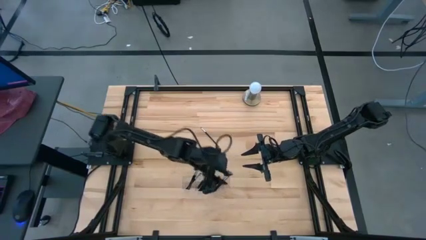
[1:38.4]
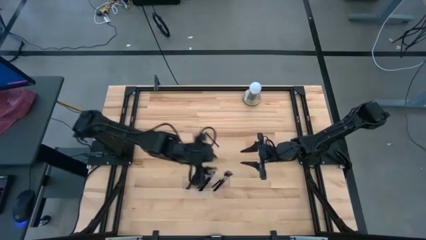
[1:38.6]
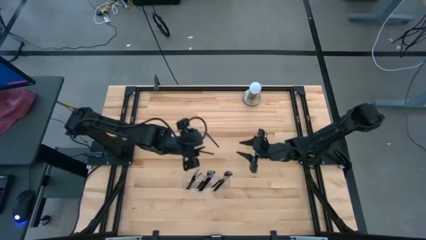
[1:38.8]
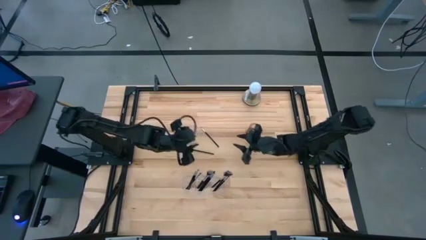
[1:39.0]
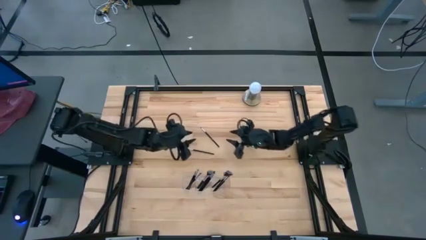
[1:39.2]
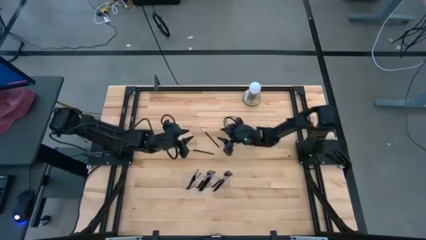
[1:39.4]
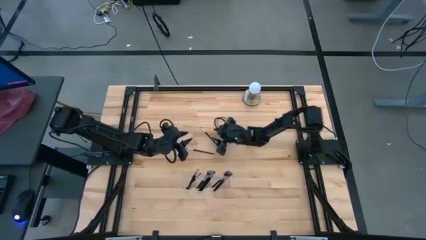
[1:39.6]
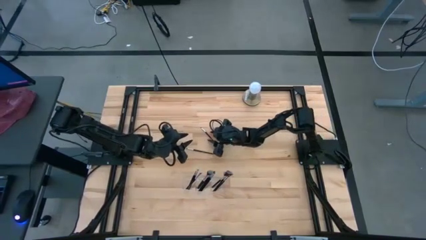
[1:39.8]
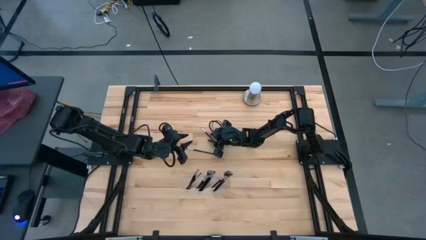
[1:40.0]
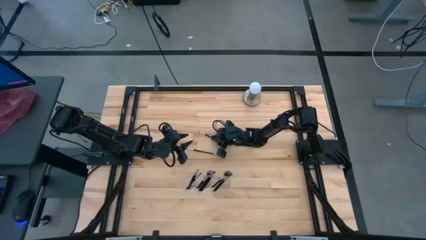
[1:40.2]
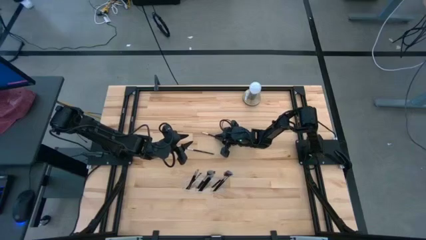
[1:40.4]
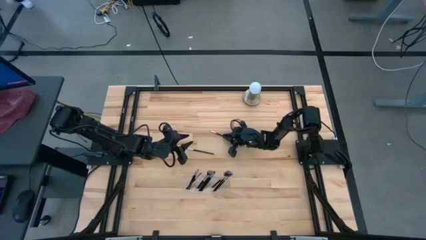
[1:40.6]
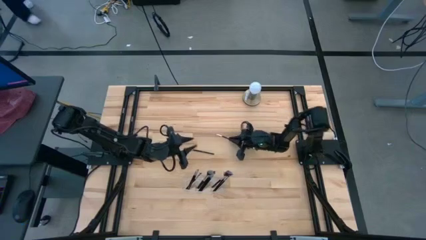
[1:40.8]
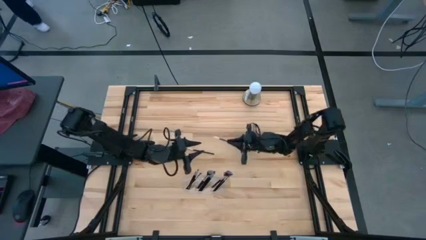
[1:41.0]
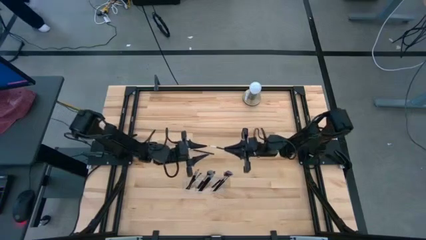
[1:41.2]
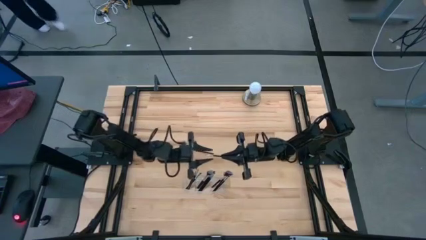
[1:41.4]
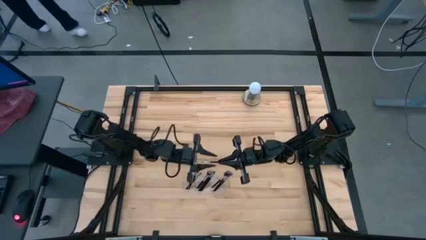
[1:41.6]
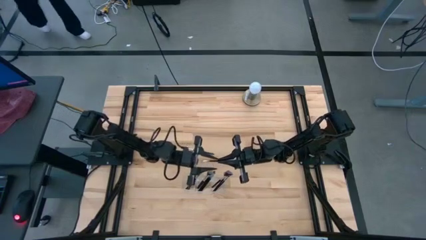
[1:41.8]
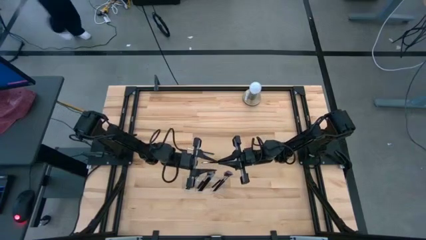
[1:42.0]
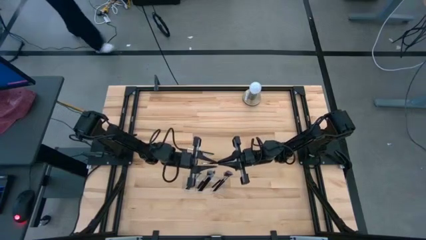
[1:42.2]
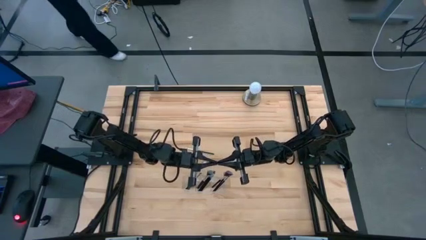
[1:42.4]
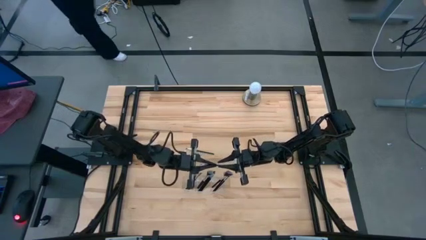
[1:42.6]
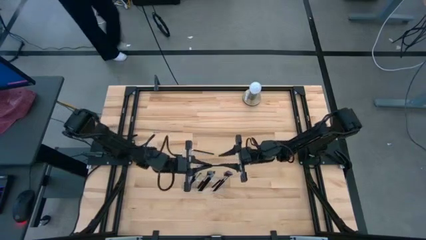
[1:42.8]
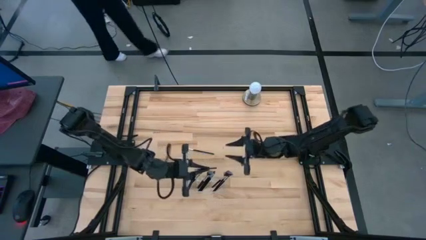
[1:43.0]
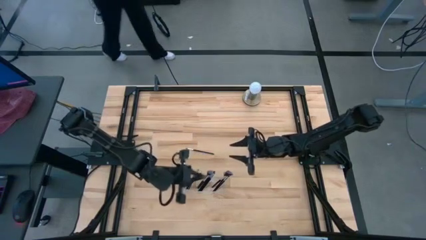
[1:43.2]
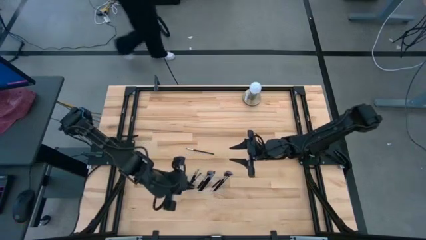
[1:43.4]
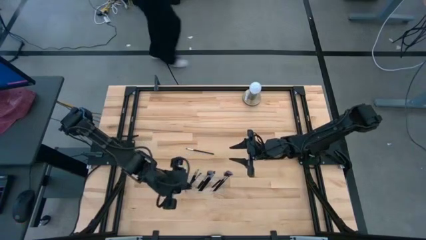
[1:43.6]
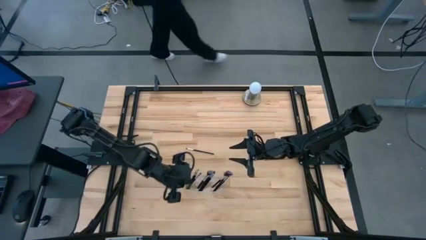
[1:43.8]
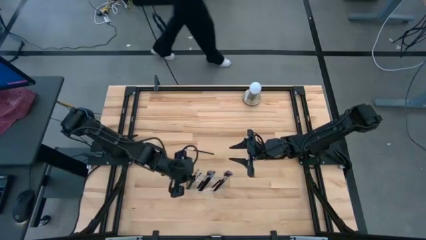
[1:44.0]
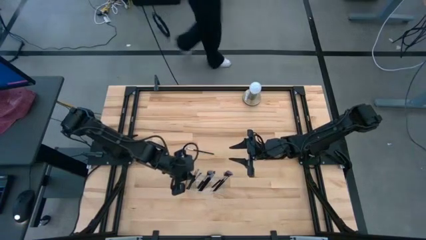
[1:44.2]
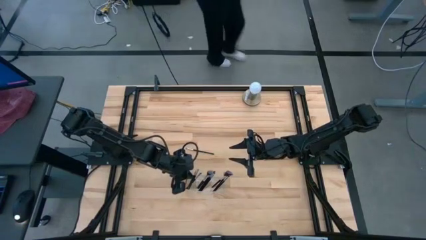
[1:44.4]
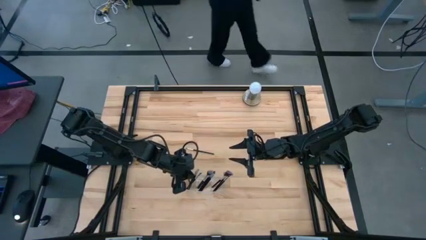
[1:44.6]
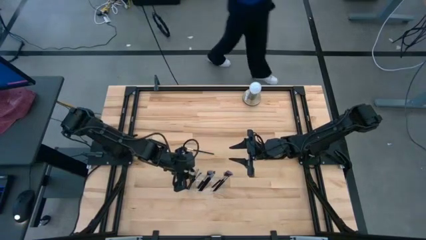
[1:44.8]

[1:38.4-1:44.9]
Task: Put items in baskets/containers
Put the black eyeshadow brush into the transparent organizer

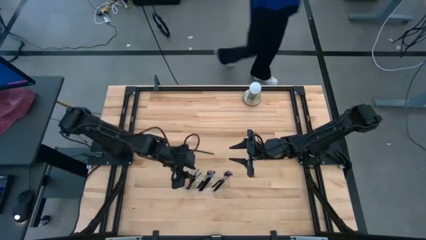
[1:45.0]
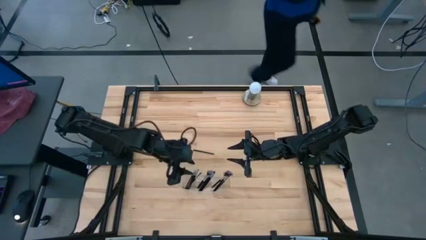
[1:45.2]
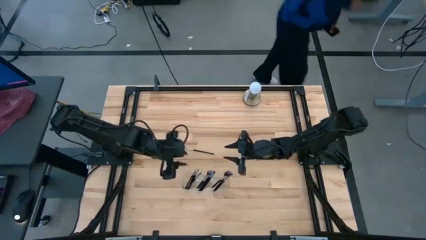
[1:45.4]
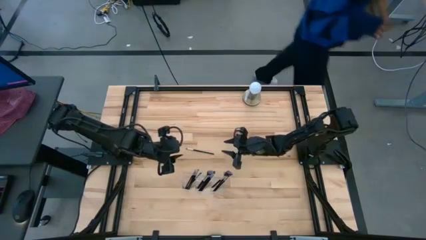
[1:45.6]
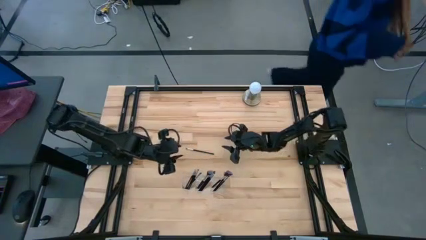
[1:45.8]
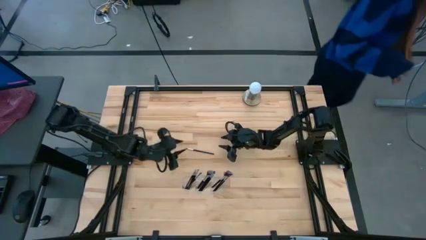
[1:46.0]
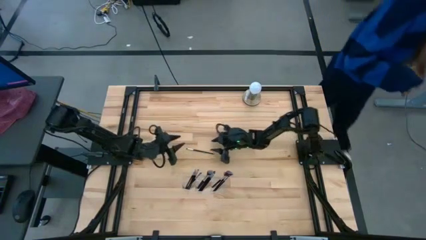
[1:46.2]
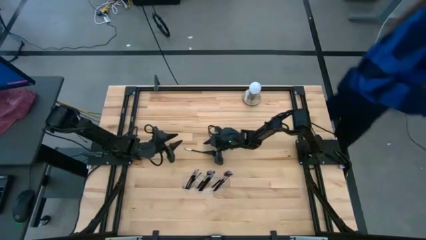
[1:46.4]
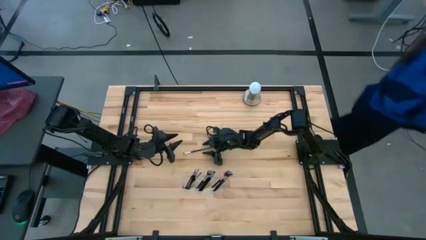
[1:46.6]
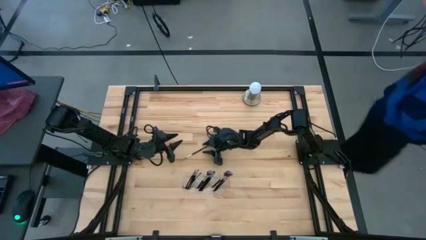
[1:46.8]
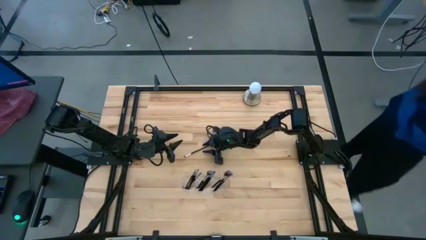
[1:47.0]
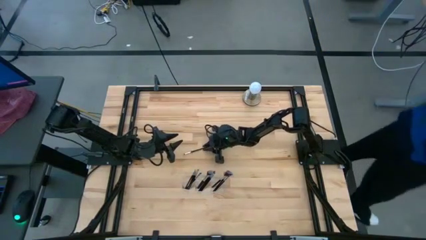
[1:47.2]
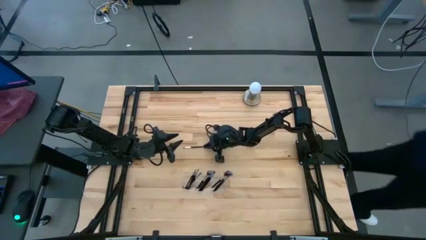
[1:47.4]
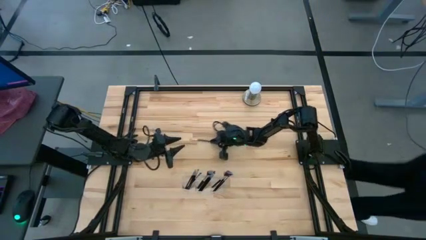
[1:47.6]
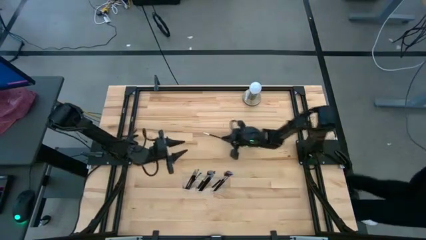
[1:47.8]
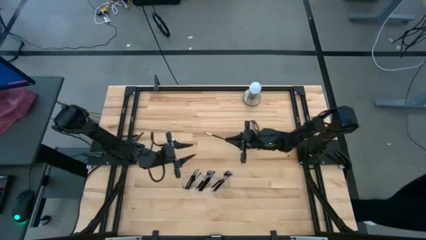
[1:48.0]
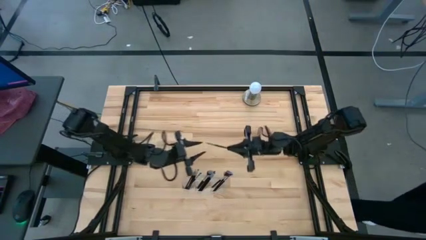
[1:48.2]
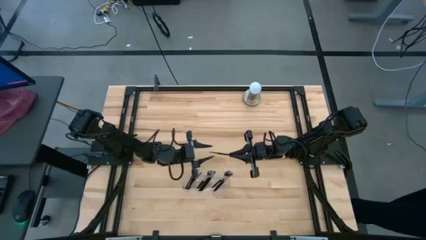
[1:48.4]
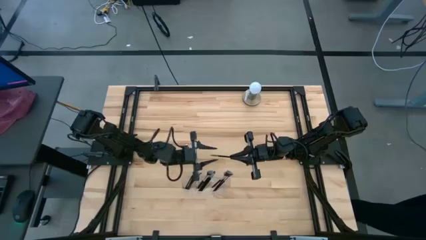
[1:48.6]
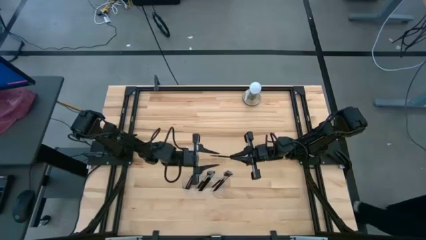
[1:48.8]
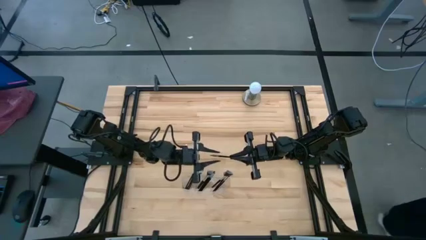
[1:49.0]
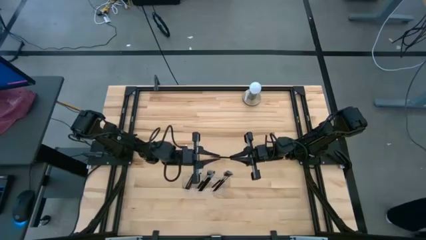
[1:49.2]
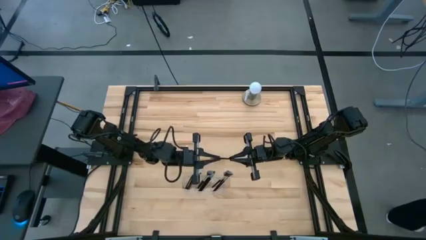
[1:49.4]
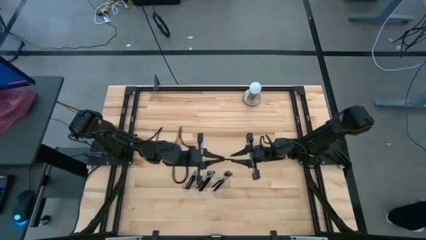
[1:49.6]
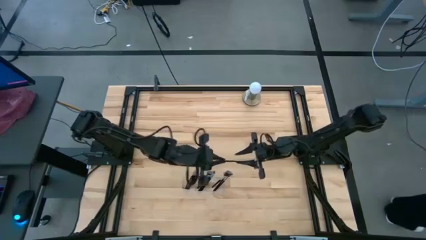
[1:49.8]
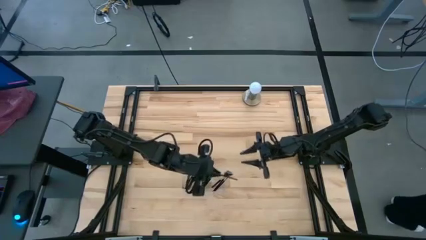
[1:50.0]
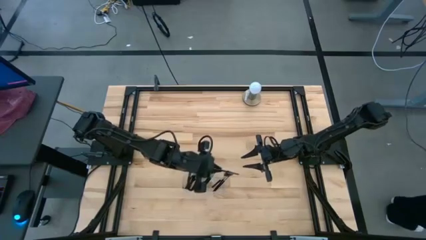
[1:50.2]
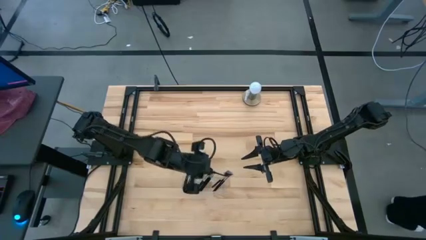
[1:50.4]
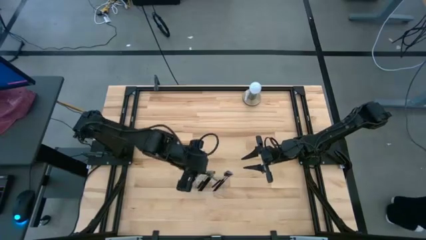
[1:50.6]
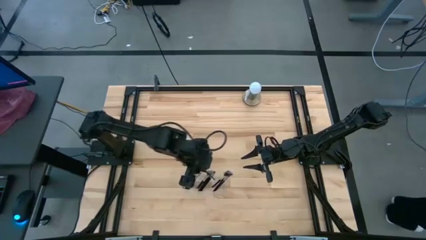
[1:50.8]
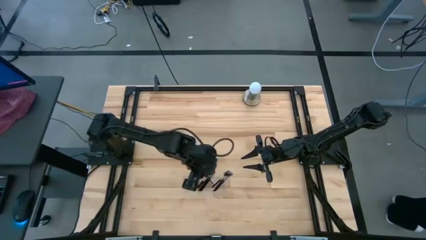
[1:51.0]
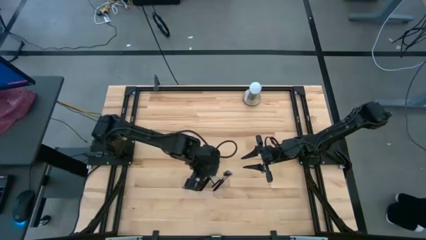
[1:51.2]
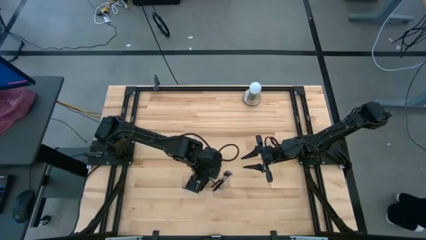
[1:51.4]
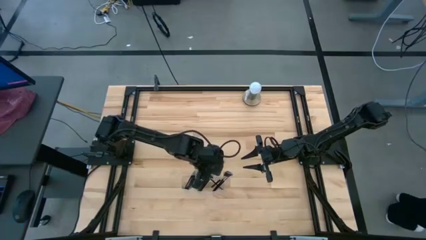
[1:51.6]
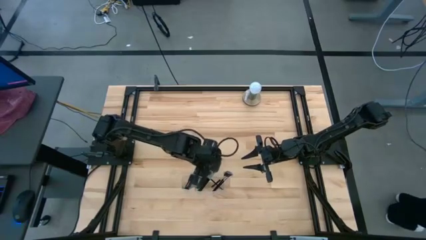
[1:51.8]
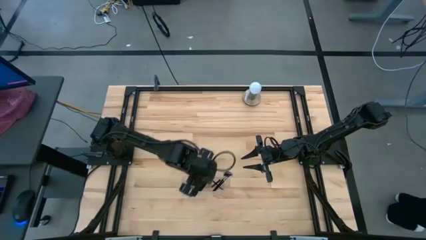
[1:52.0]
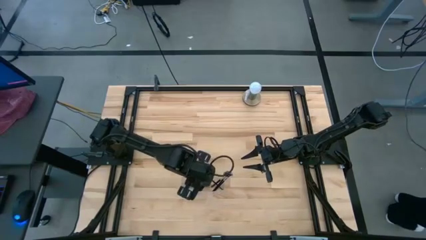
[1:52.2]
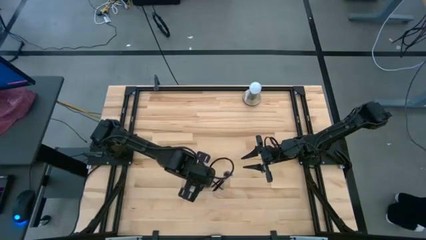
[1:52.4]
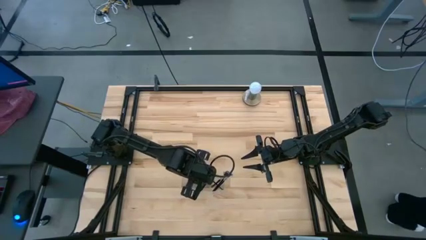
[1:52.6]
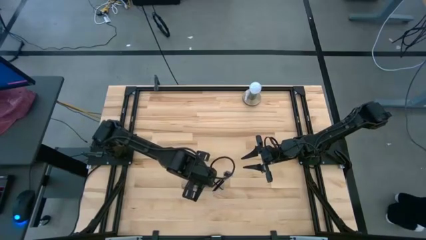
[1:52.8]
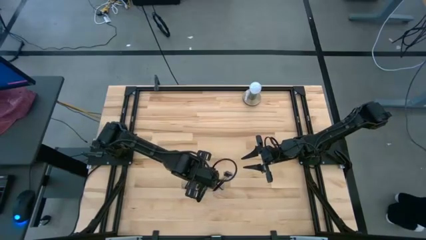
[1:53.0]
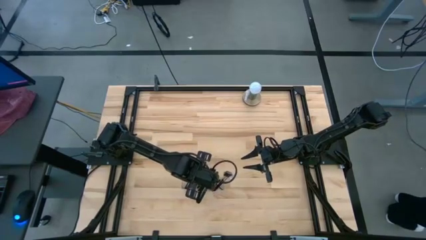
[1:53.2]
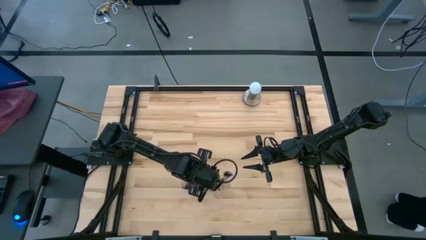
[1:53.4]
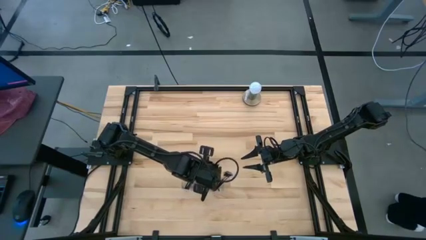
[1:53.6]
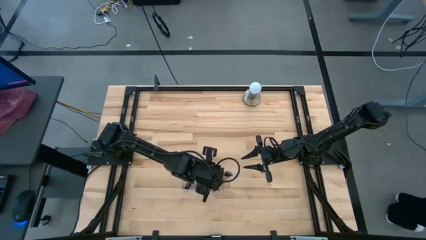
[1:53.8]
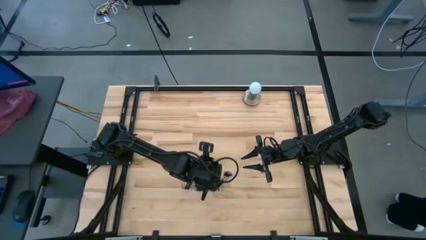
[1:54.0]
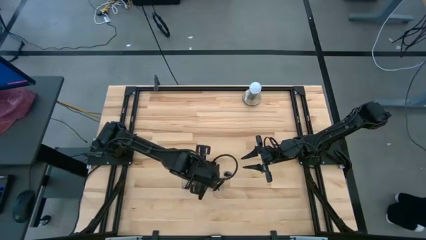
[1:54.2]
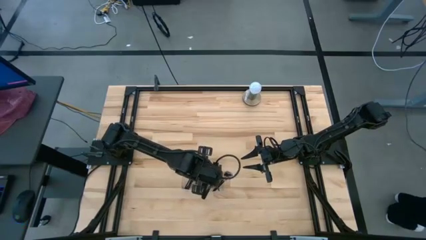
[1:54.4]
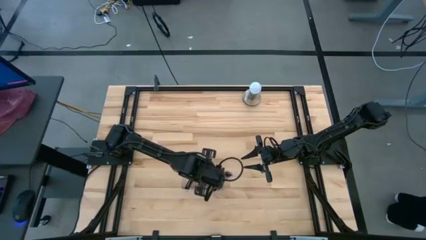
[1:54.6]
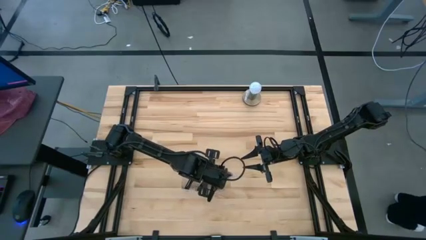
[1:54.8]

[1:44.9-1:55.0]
Put the black eyeshadow brush into the transparent organizer
